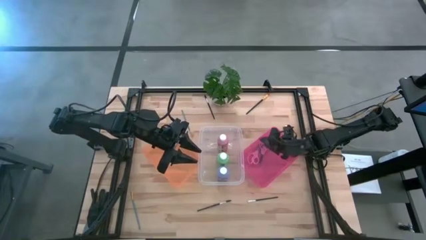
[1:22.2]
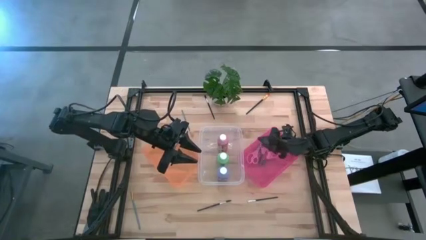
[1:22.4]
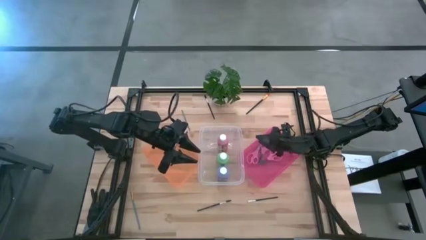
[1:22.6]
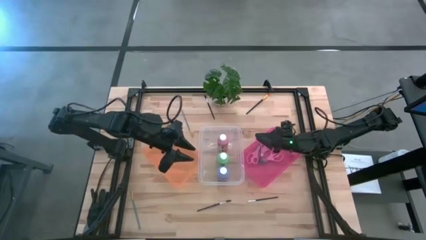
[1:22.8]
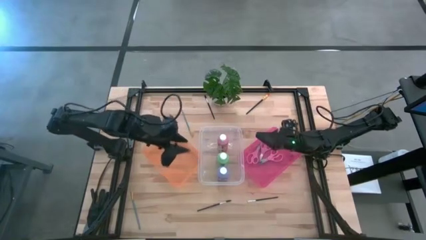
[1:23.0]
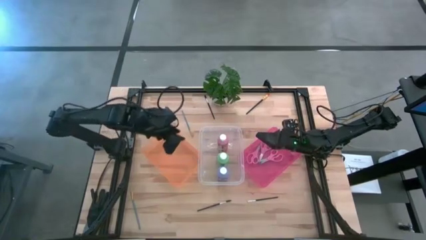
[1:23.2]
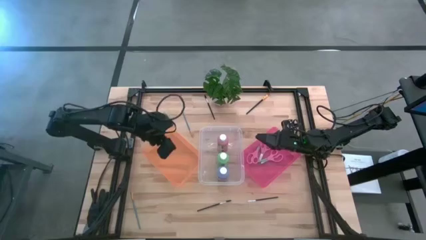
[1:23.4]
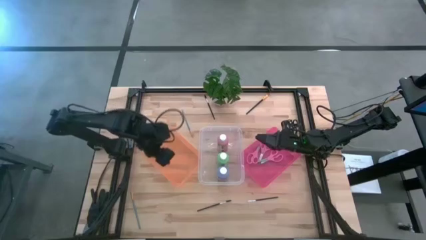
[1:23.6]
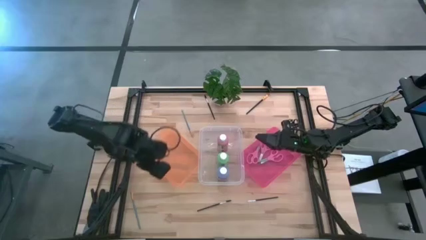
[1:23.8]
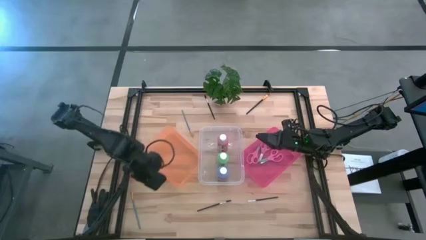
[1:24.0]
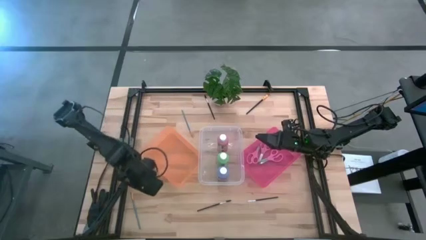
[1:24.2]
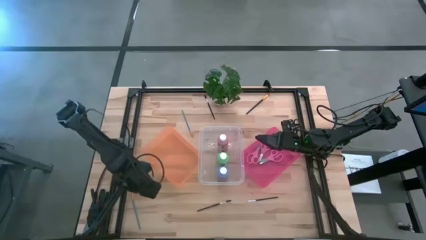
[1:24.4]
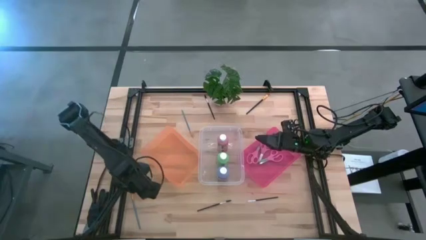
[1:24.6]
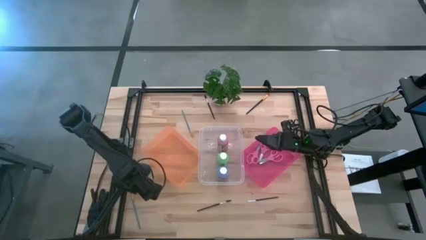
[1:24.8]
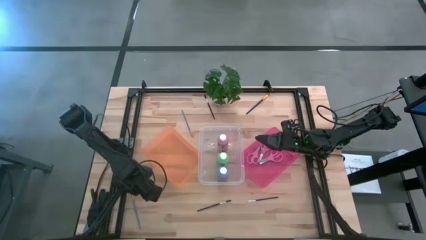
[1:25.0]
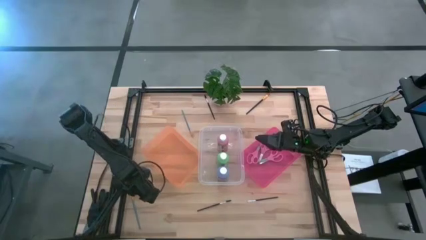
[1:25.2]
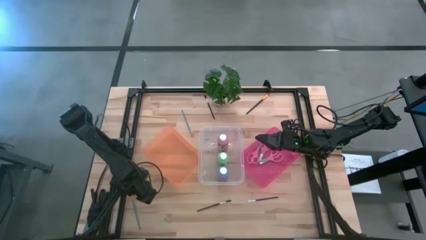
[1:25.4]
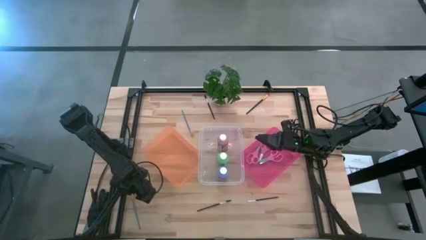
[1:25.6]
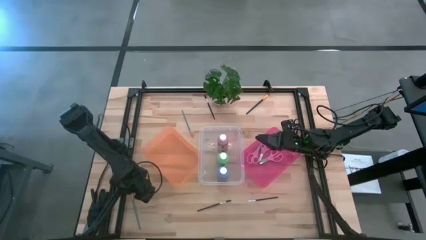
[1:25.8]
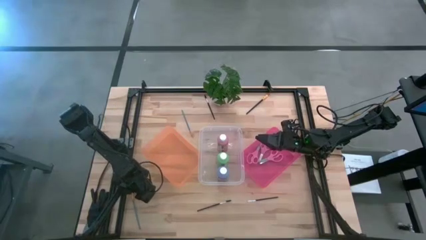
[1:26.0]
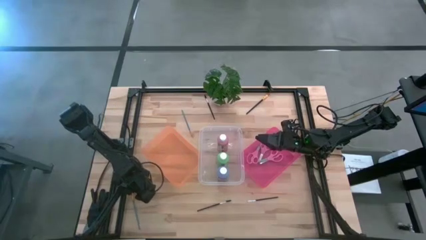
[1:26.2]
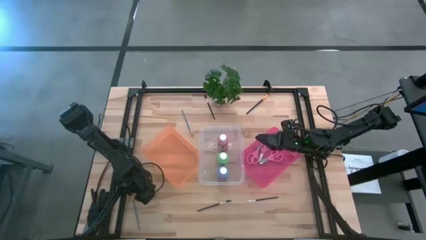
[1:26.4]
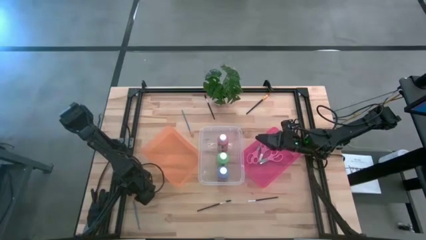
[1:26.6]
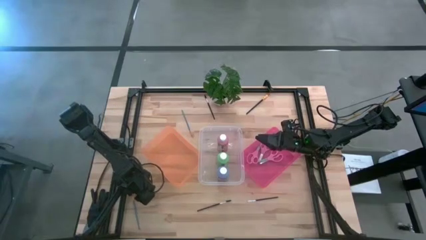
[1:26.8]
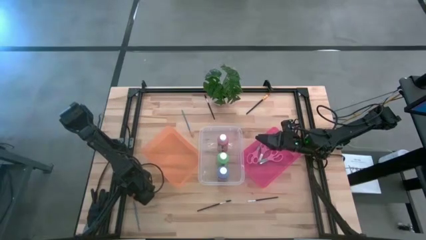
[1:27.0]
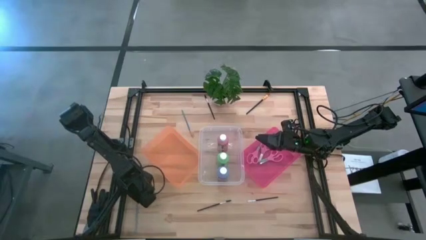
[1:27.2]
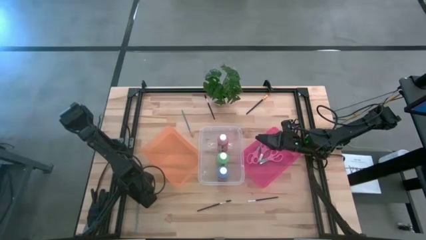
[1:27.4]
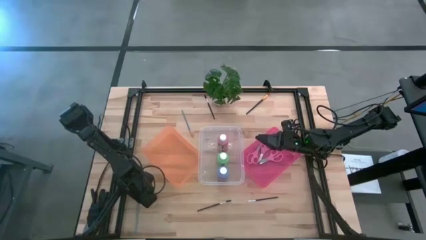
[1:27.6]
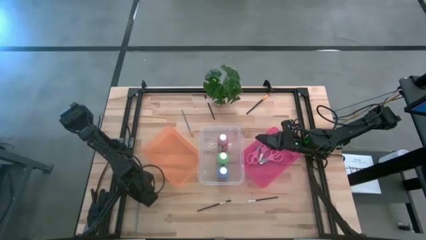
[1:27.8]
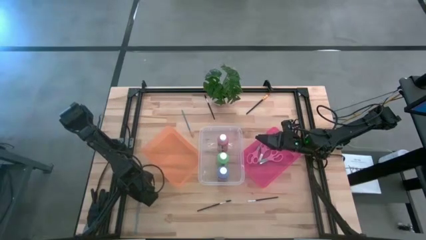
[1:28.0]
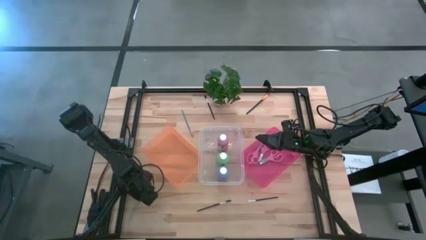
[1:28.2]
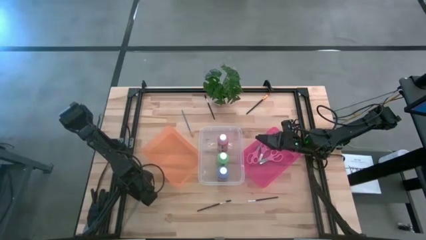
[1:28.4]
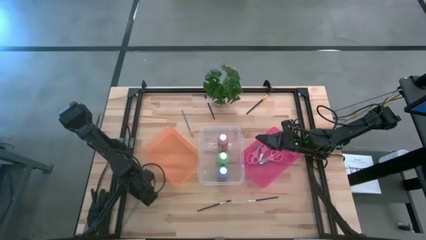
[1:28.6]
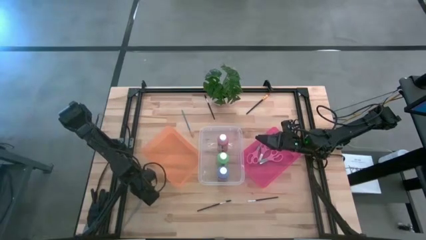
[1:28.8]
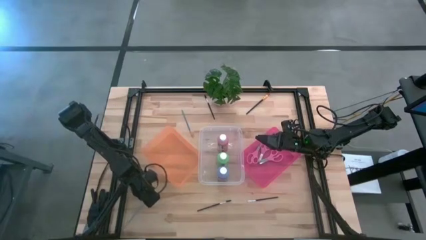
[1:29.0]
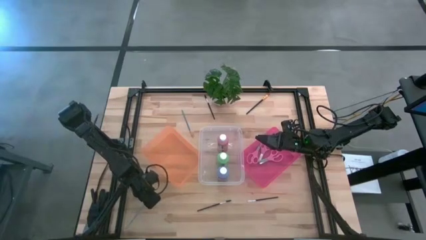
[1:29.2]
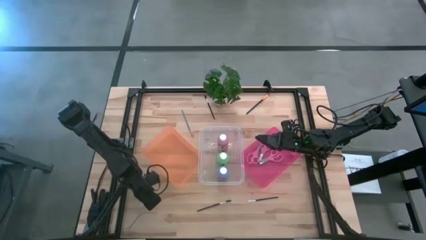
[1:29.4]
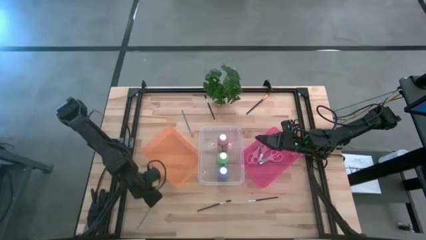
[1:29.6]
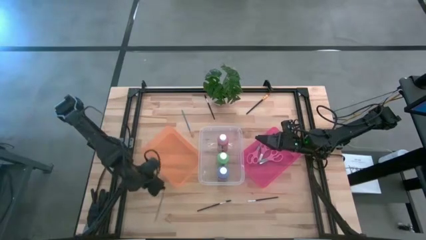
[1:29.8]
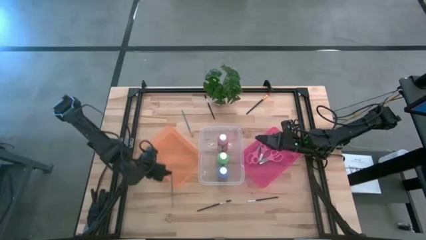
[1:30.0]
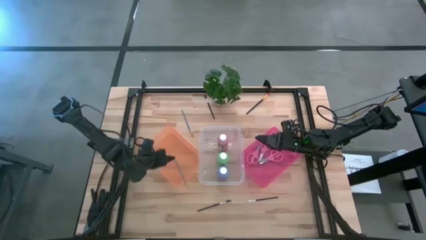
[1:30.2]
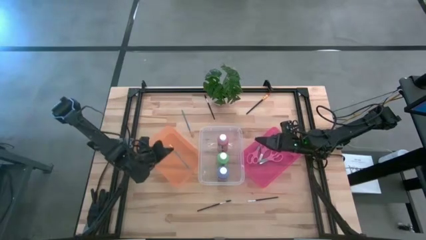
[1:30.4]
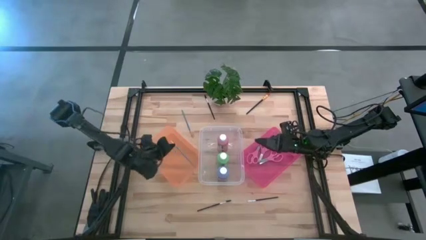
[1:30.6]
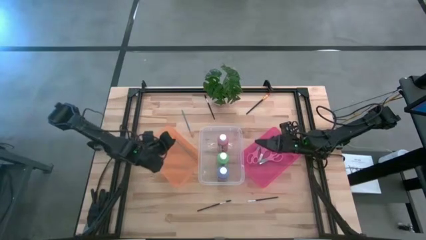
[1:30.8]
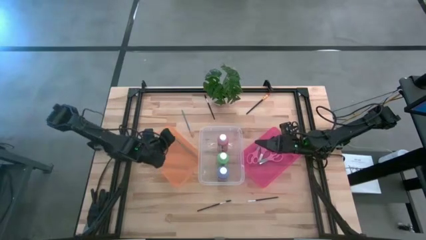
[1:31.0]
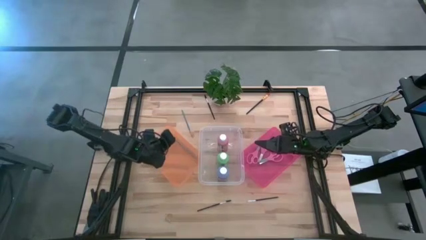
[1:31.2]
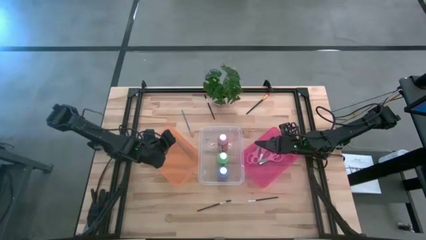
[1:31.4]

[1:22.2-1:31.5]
Task: Pick & Place Paint Supplies
Put the bottom blue paintbrush into the orange bin

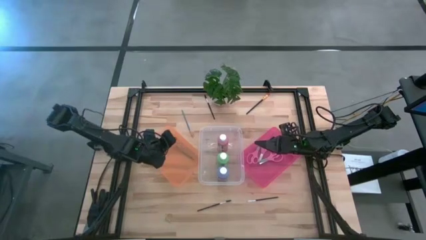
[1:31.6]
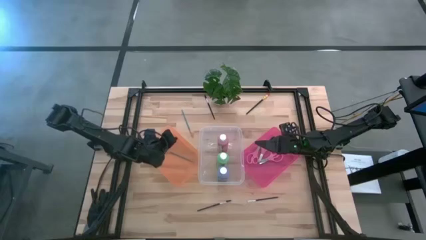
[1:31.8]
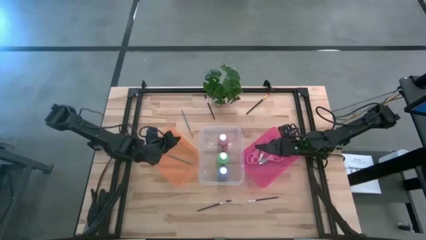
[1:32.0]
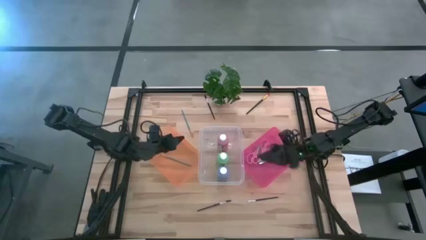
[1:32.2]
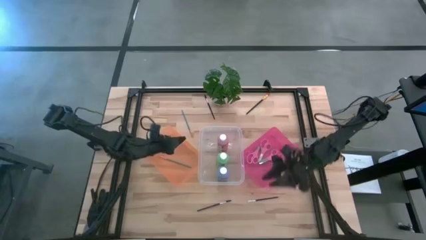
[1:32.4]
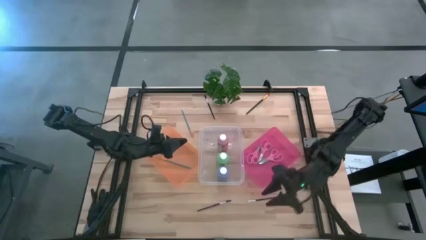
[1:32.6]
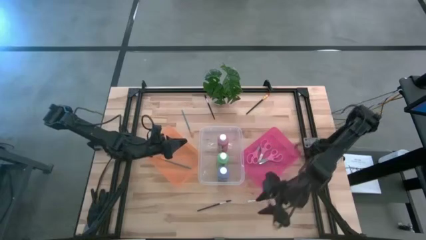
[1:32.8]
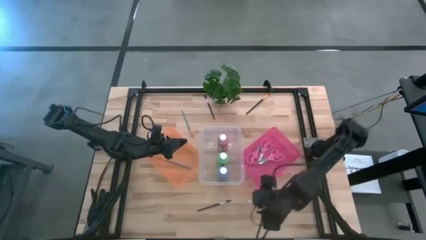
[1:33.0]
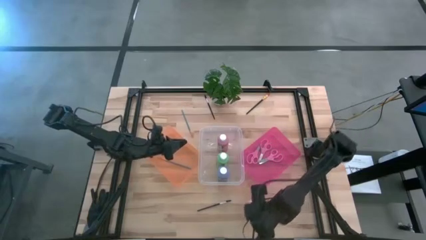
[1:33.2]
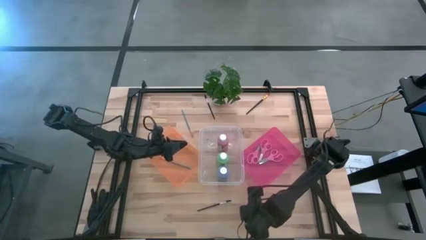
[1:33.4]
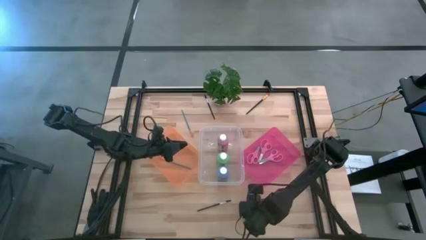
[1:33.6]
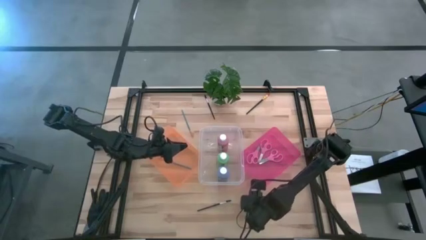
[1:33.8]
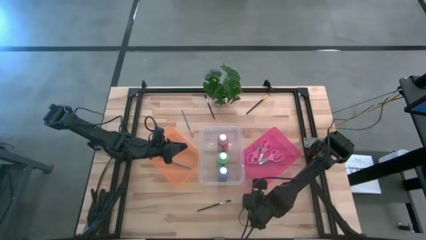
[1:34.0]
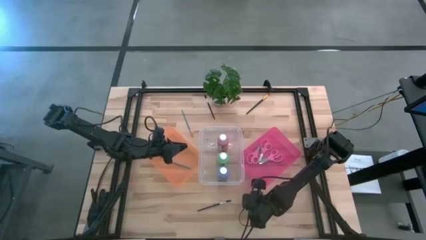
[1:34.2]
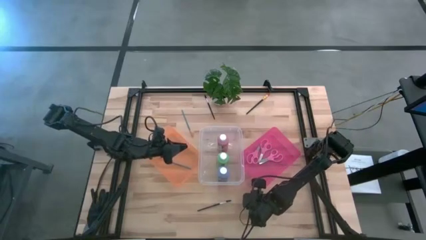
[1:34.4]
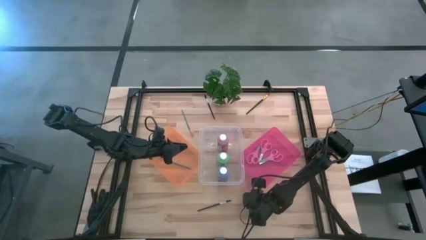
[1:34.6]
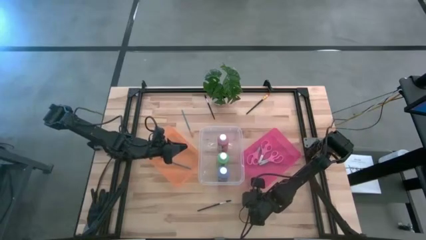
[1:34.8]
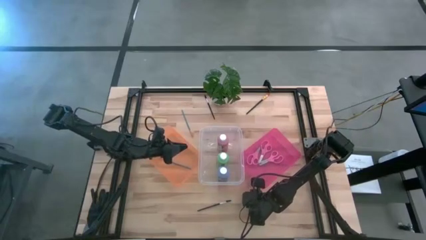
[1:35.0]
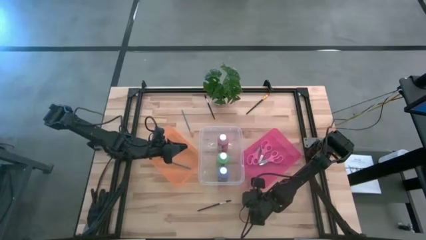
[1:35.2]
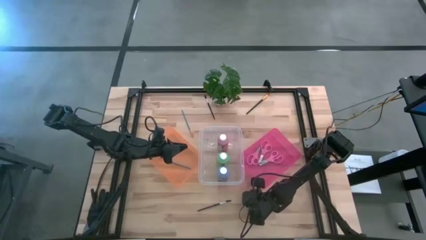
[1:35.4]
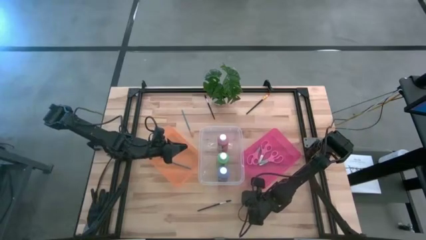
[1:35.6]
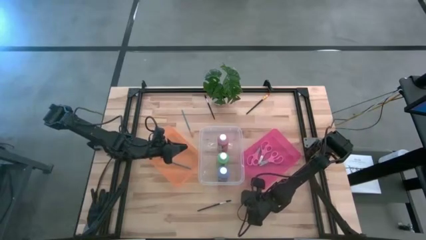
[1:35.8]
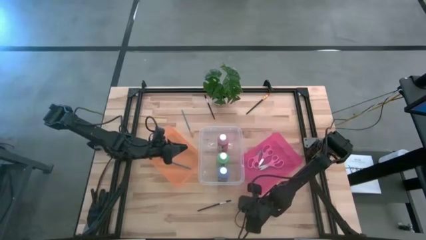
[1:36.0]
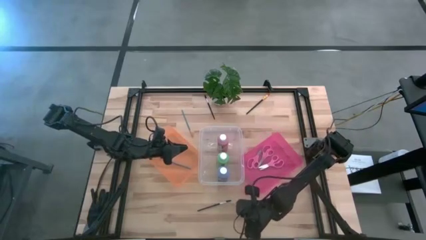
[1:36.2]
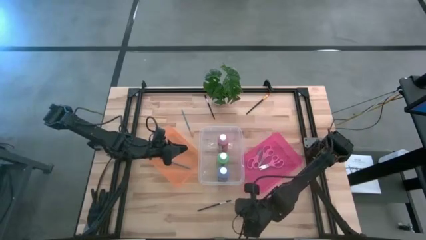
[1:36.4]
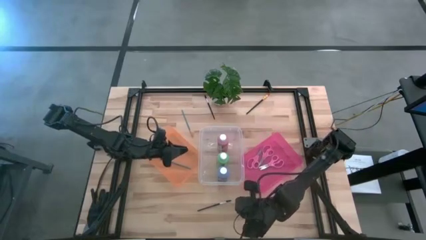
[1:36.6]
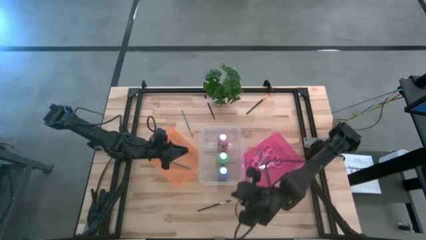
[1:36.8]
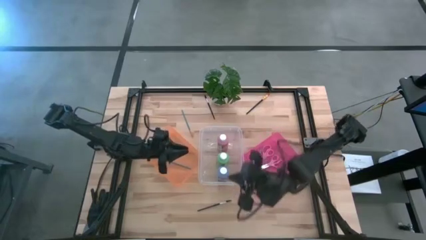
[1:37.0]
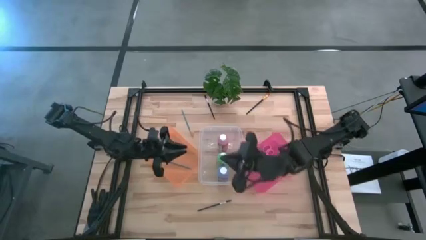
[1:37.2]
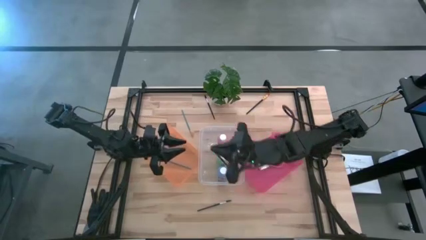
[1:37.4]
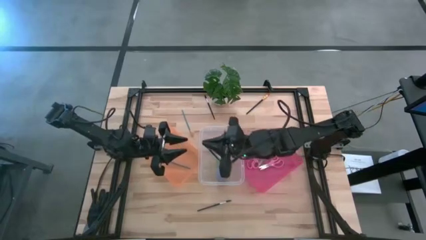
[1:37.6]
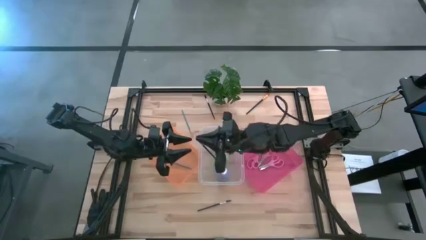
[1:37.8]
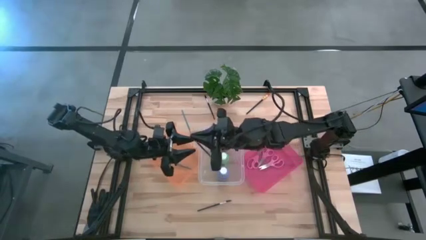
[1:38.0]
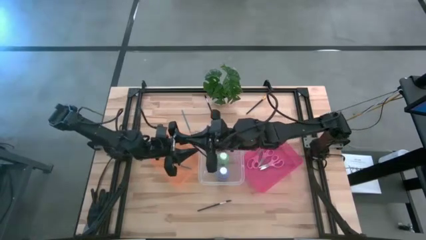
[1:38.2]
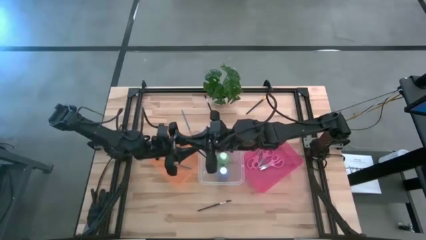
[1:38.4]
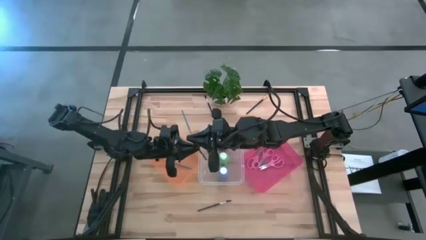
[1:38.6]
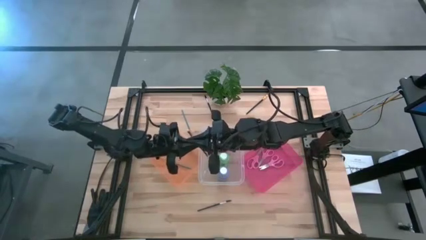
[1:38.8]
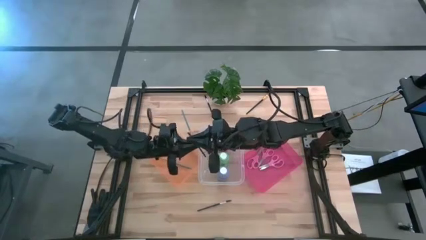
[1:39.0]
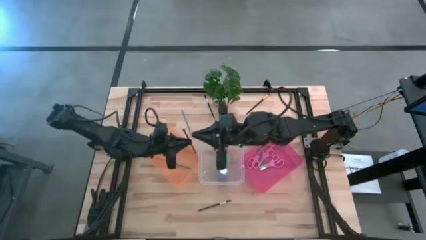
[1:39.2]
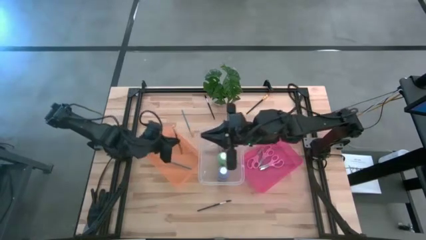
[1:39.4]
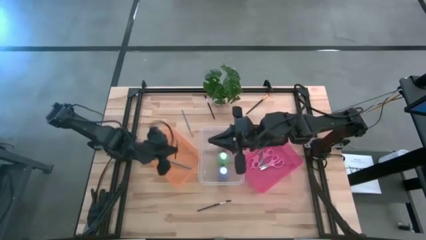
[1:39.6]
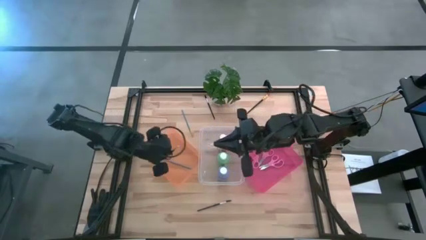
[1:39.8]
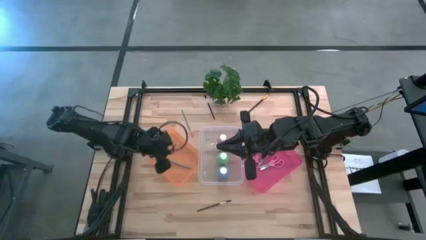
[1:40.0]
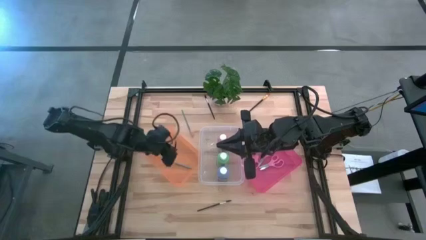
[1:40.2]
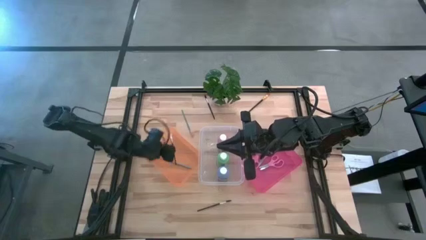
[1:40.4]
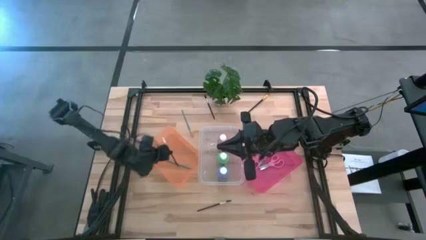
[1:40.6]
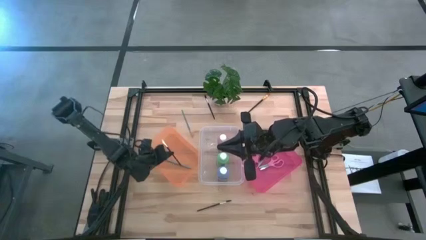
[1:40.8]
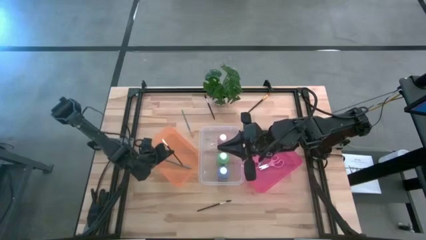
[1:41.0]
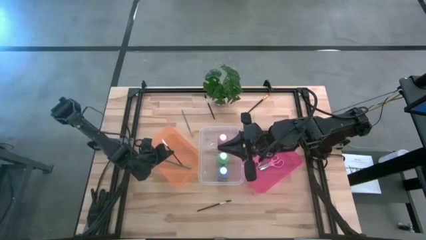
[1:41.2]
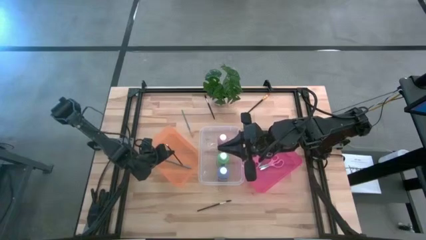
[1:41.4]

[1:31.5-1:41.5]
Put the black eyeshadow brush into the orange bin
